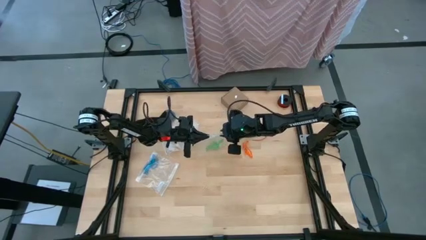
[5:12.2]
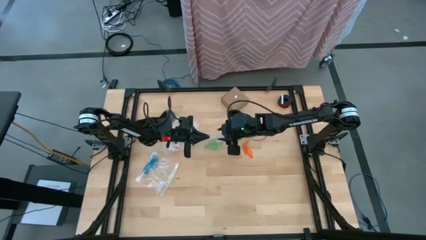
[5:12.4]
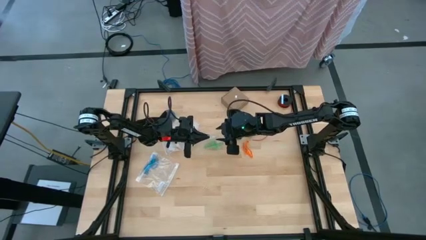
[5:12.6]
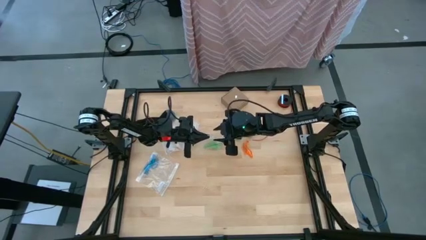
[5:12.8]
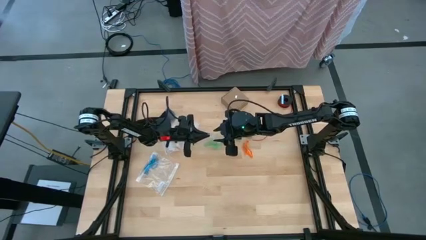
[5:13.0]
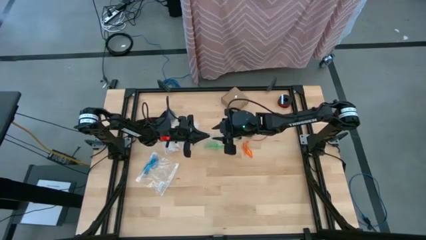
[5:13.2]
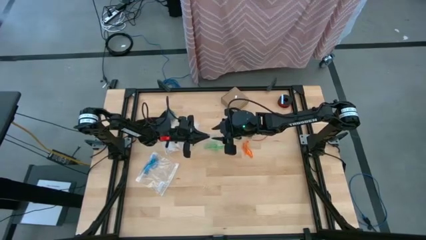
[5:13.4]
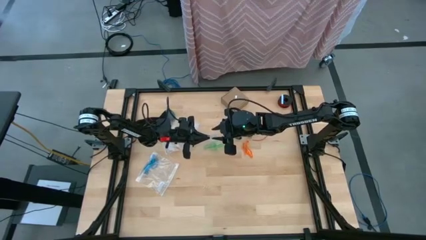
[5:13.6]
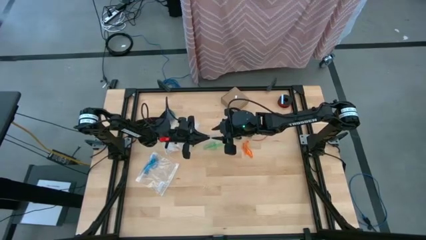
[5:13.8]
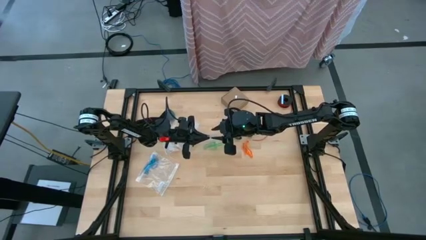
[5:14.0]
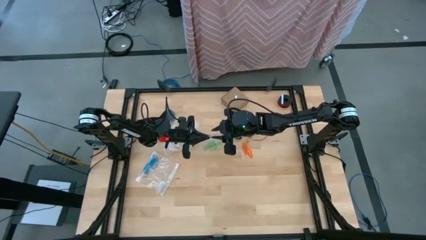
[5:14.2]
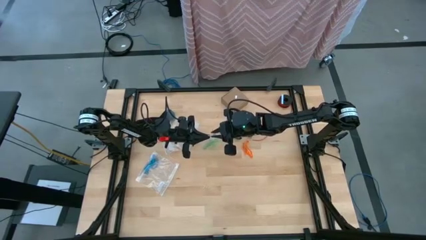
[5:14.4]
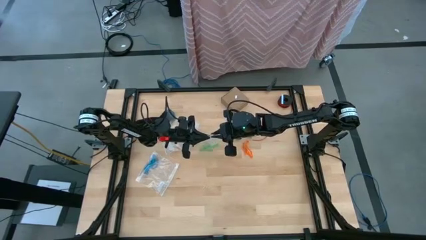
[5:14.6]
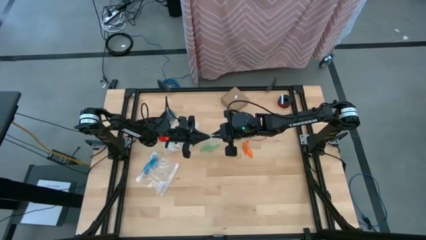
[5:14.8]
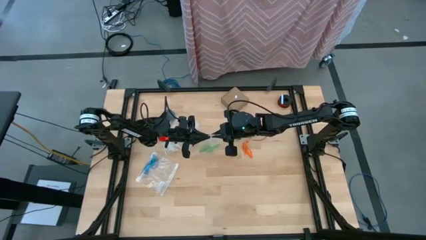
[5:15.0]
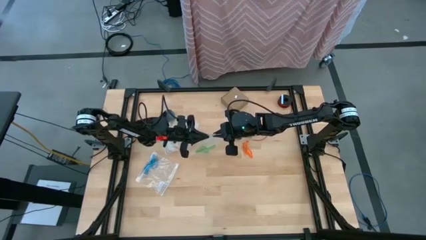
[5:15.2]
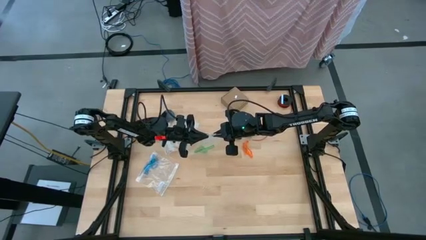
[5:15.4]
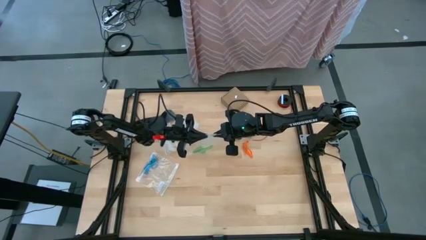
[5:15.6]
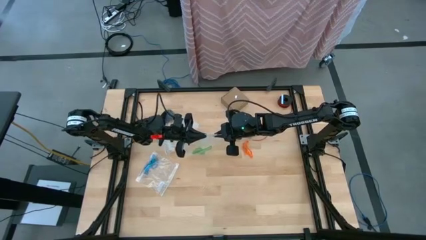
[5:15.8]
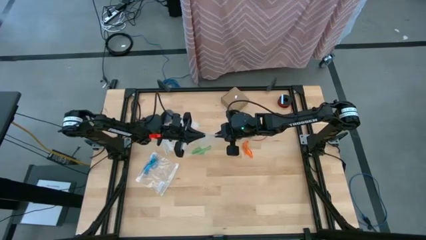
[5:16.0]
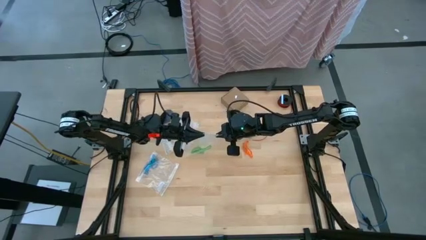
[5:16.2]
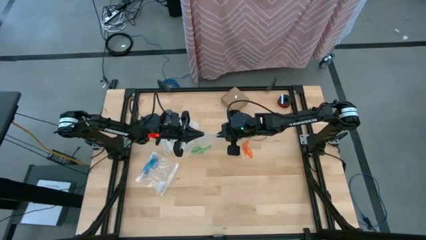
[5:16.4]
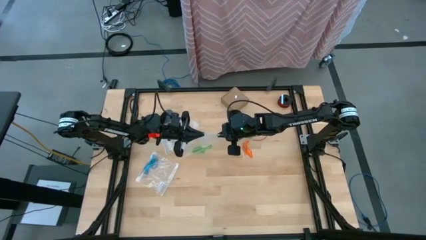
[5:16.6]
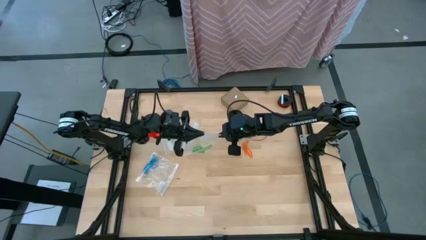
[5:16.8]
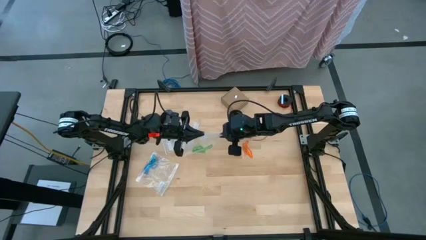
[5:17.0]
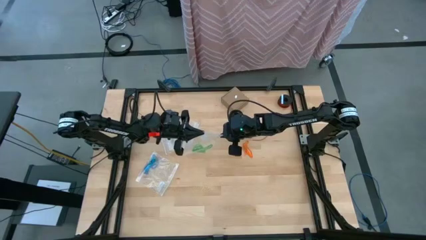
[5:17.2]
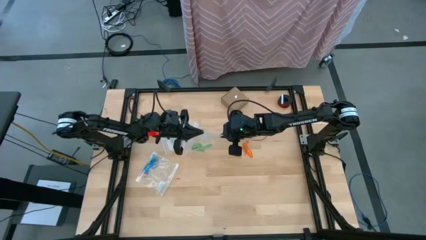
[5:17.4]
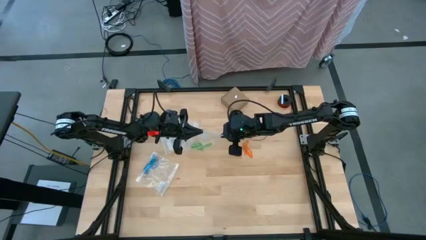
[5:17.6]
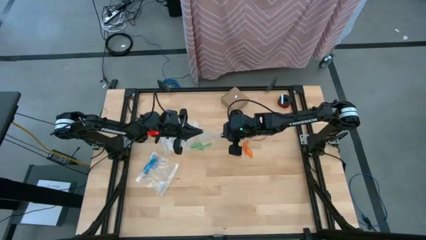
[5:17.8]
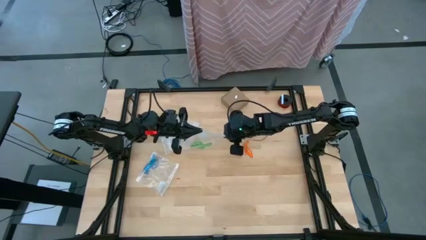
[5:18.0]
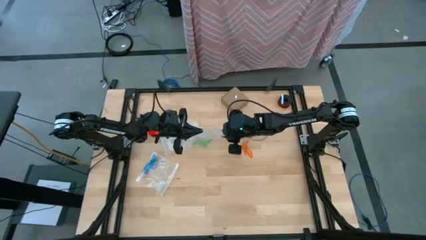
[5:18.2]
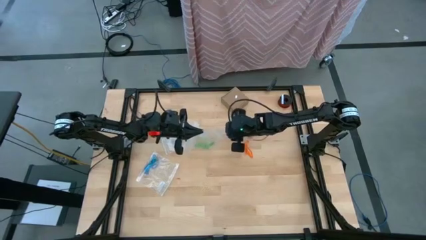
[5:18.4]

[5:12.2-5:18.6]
Task: Sort rubber bands
Close the transparent zip bag

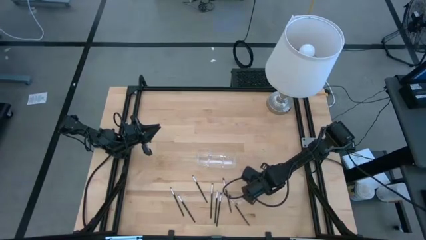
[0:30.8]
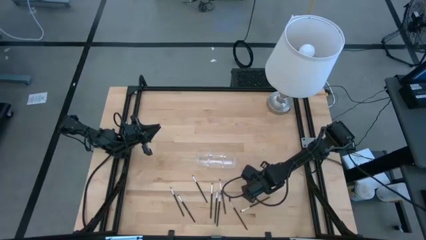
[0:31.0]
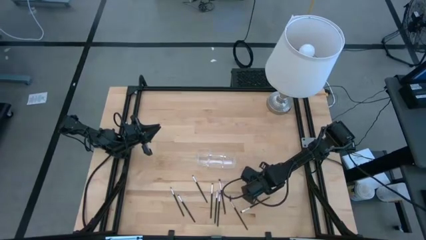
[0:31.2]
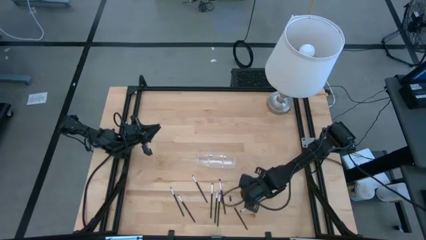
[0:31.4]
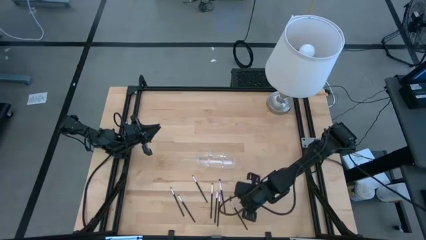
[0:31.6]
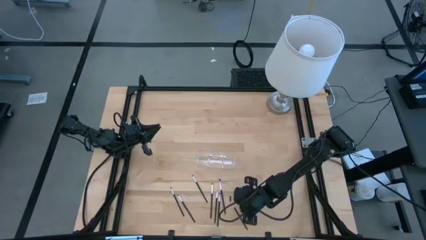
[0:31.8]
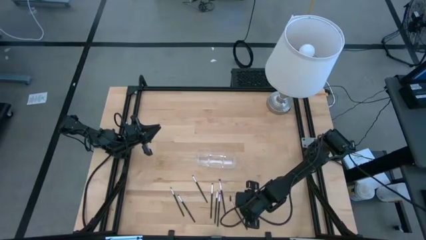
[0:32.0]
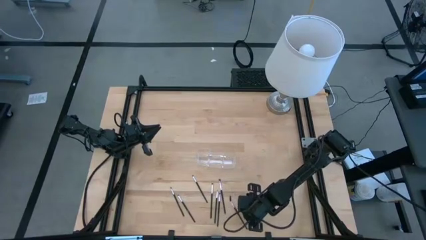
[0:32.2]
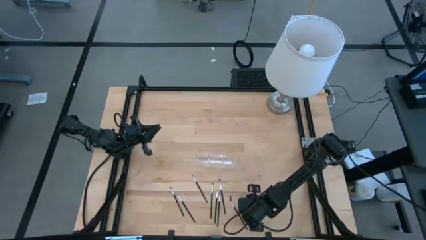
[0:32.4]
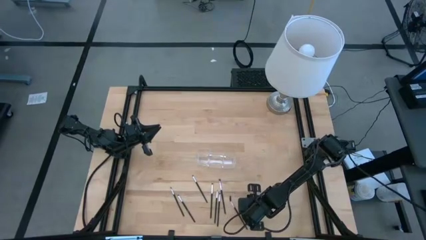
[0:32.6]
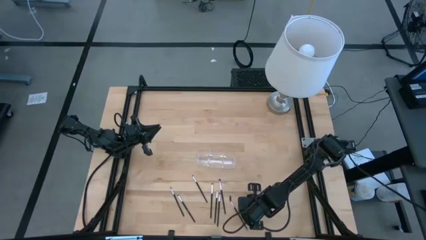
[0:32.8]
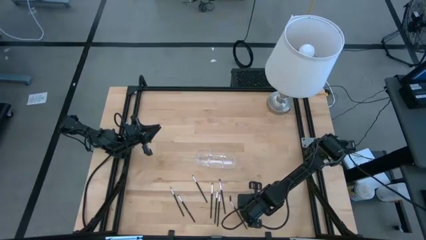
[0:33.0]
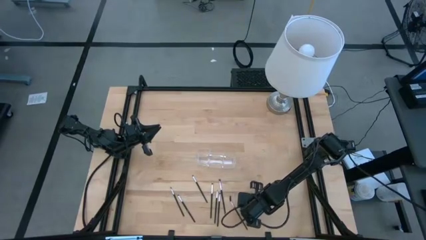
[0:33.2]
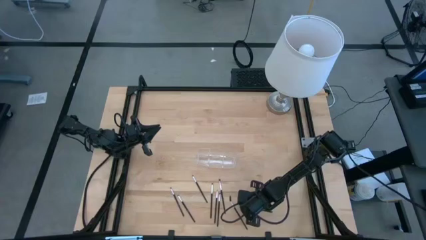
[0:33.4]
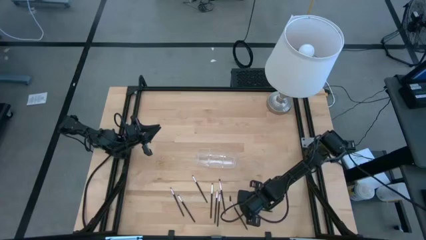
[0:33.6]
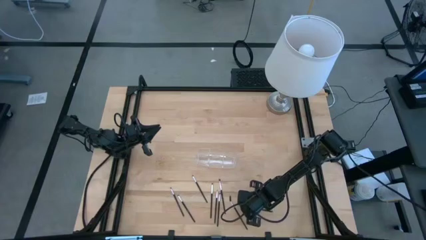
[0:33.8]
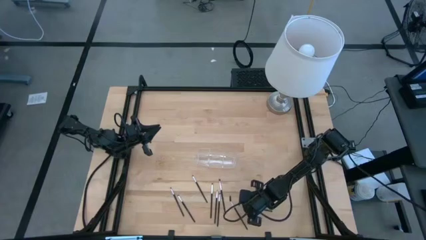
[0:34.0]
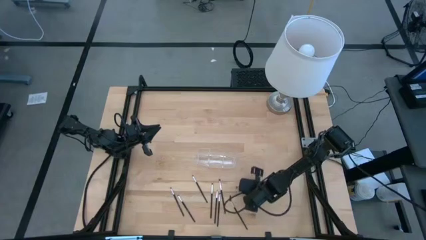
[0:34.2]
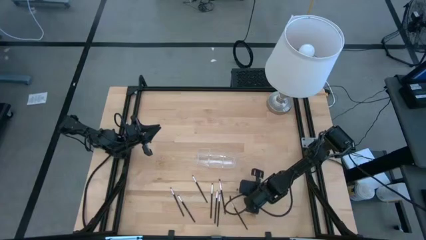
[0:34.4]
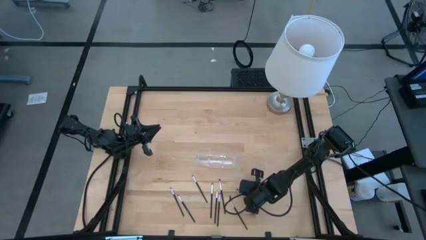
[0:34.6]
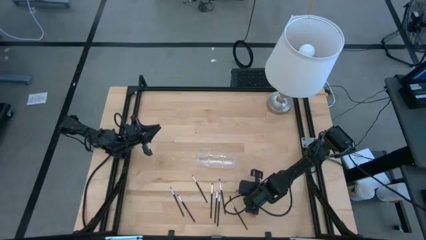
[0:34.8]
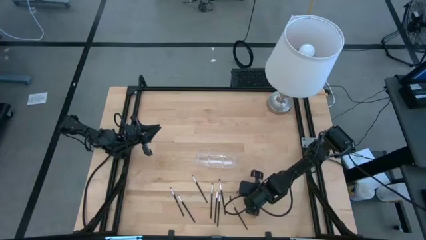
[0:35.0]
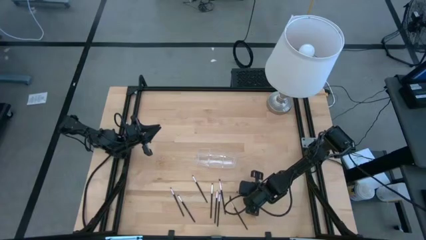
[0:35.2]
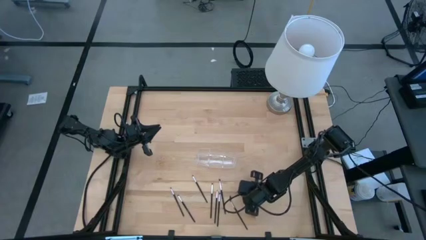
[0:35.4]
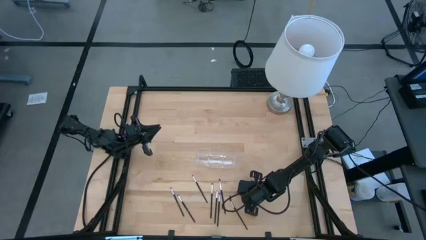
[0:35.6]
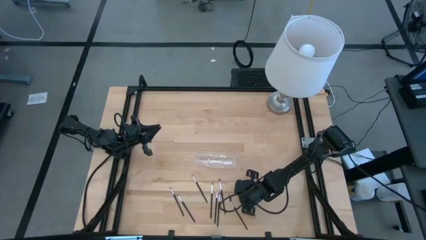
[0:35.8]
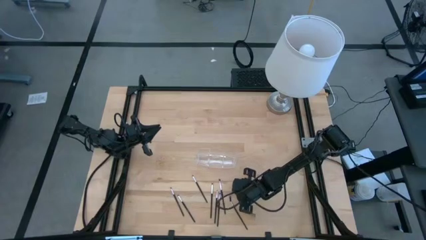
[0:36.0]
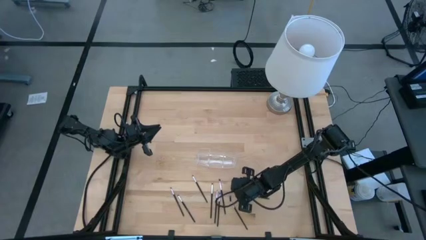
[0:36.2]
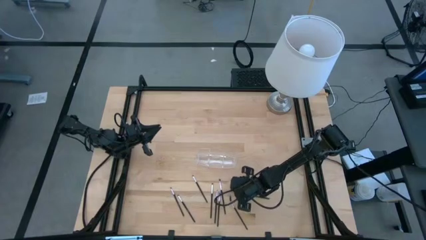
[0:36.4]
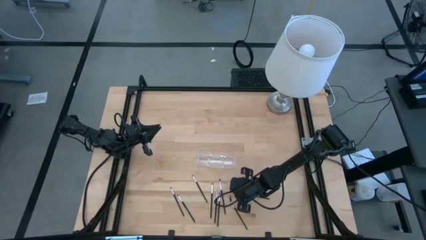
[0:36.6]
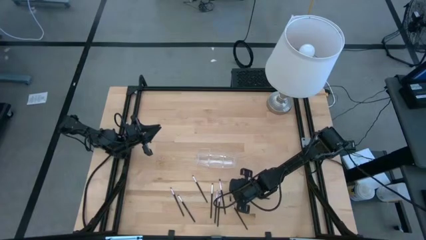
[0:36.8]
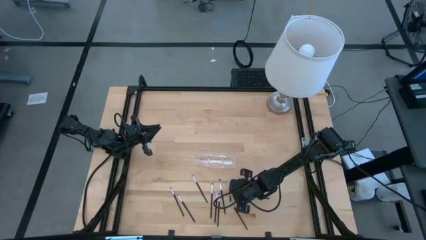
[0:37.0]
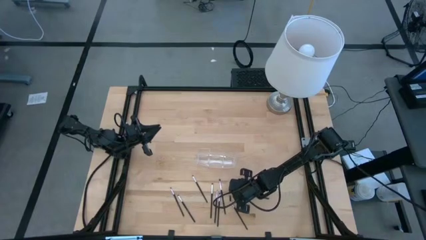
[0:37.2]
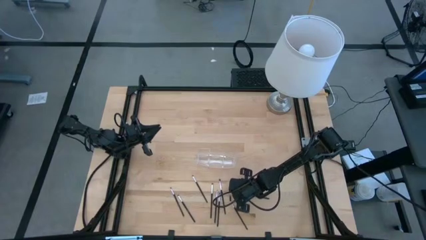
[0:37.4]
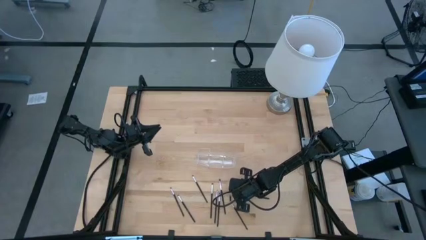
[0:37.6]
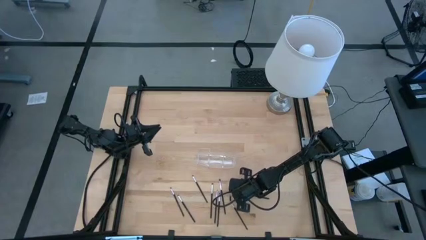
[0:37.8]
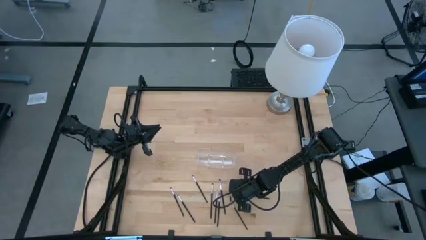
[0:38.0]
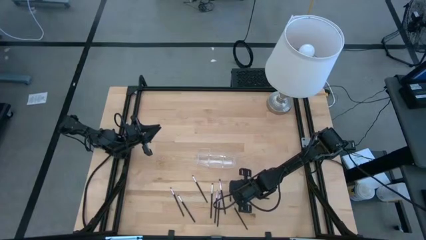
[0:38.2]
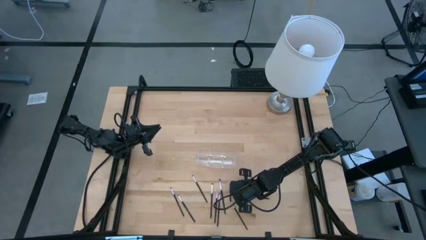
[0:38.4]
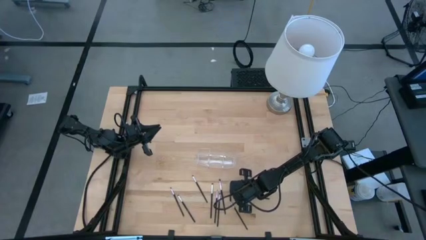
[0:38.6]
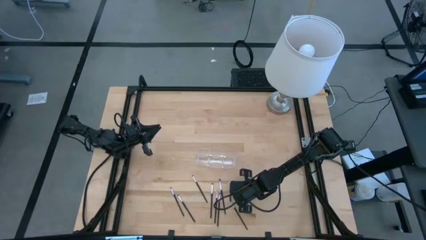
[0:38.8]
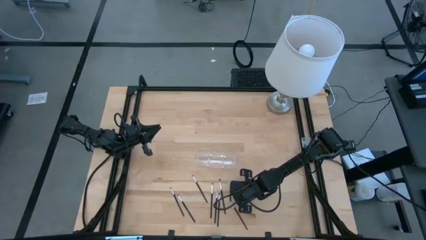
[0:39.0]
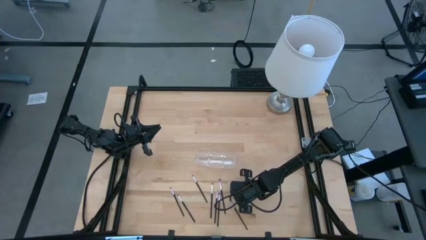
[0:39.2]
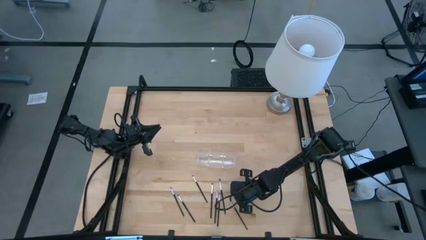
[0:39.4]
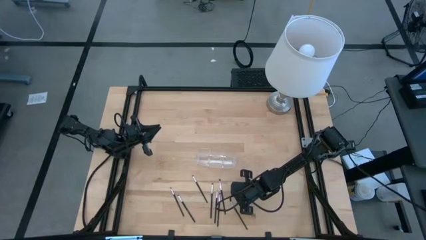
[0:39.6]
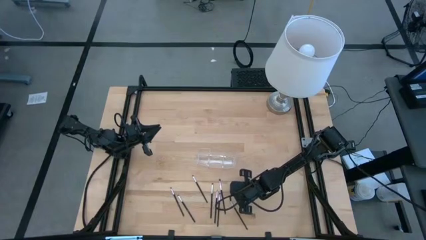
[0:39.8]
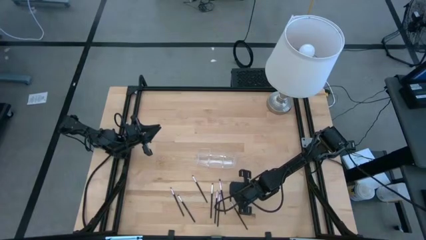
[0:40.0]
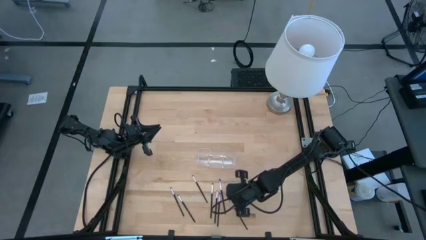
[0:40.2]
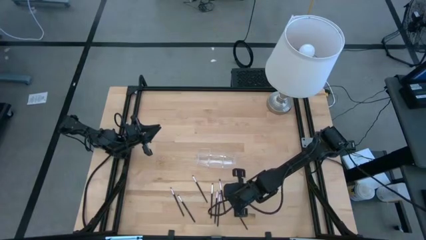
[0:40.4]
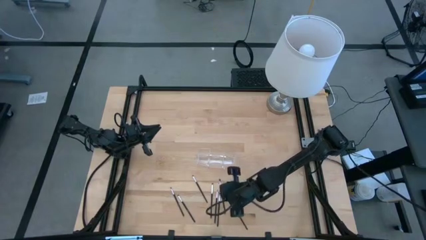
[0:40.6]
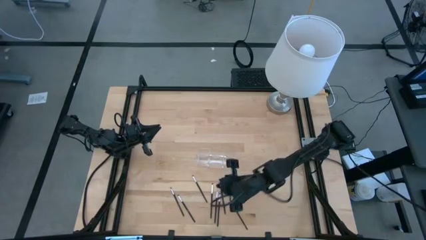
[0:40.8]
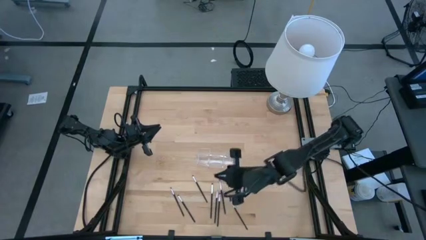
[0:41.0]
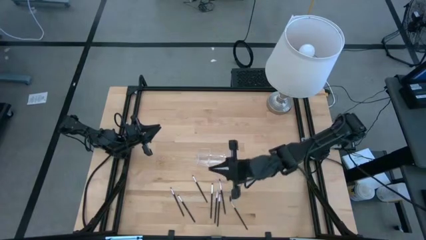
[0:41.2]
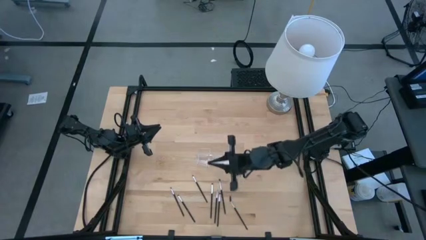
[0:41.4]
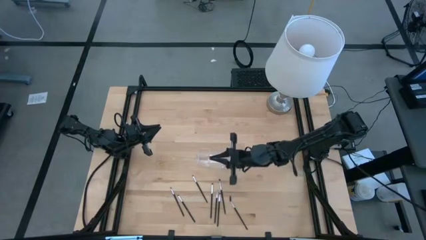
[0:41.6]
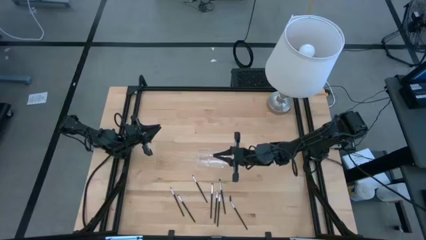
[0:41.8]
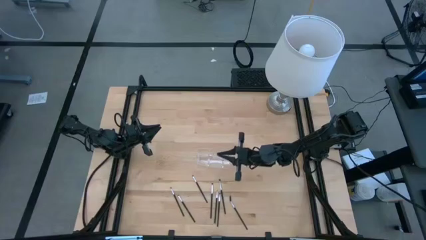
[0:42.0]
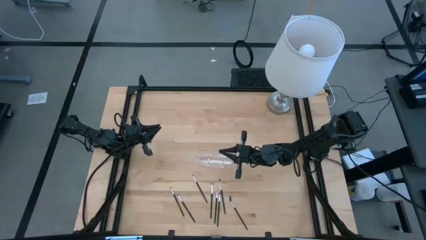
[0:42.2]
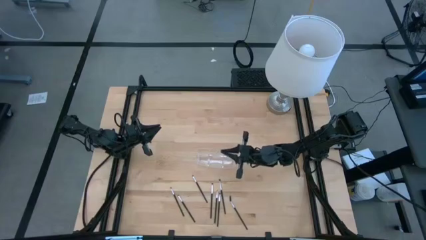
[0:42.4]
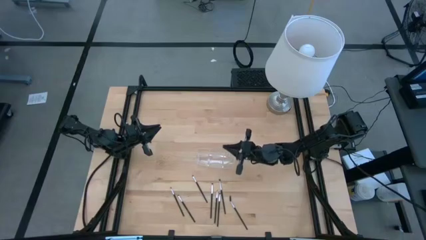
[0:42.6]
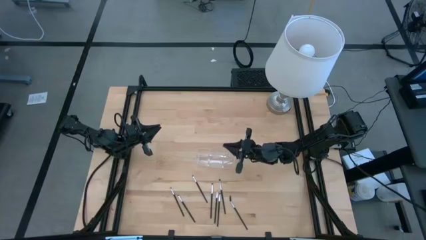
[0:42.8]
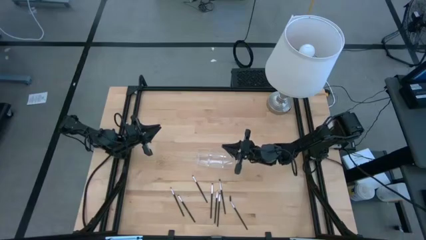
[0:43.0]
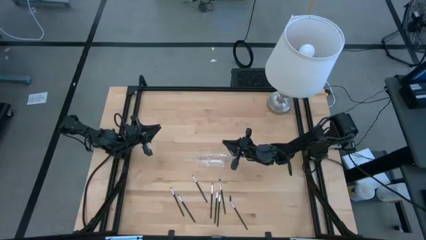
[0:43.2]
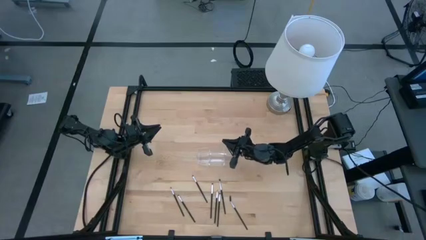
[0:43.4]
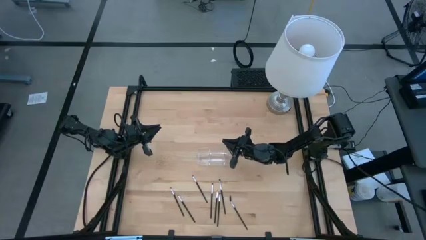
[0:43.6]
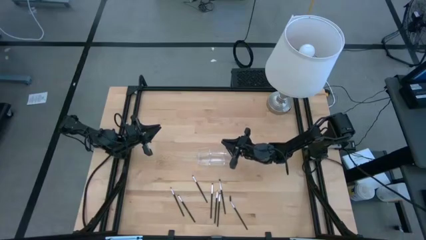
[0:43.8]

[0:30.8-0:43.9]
Task: Pick & Place Makeup Supplies
Put the makeup brush into the transparent organizer
